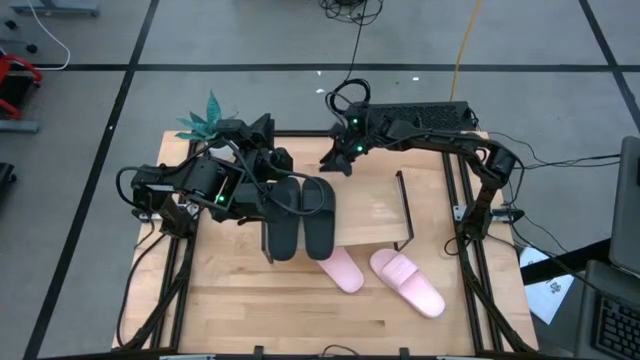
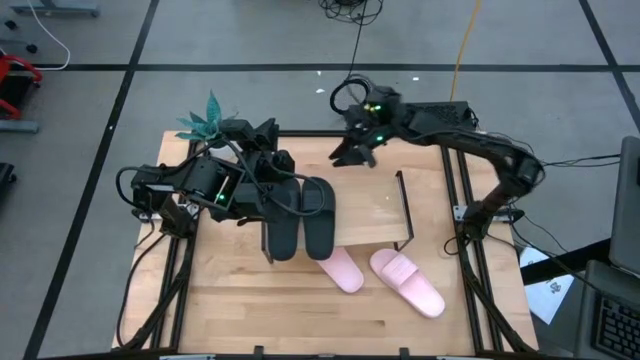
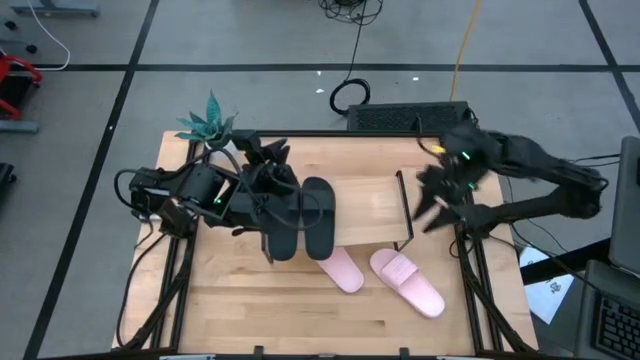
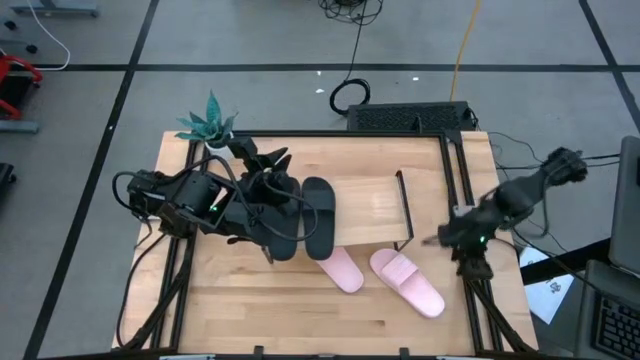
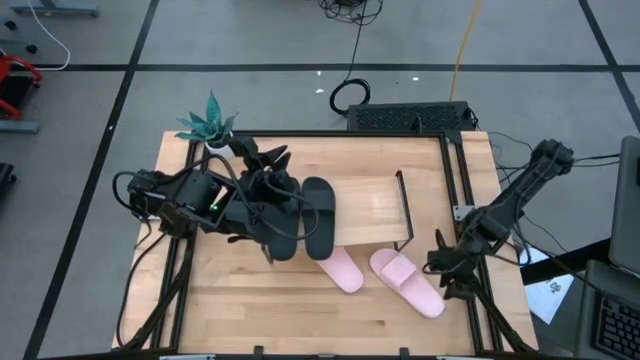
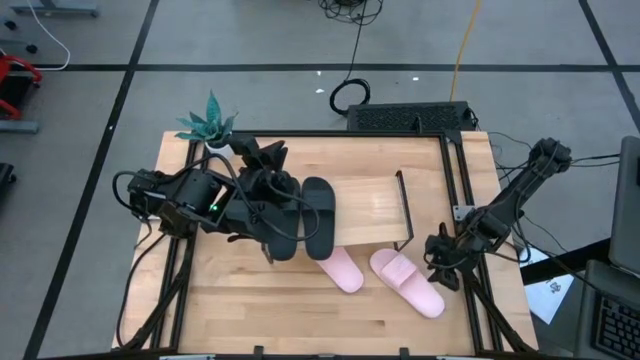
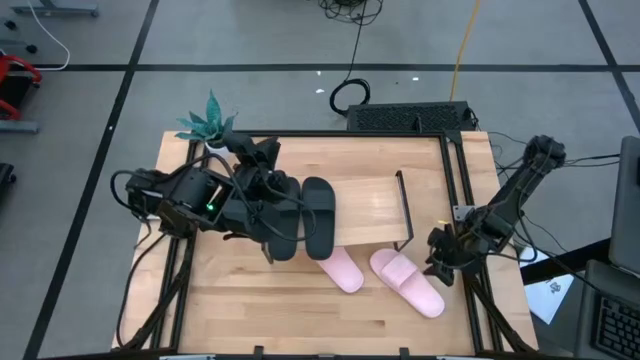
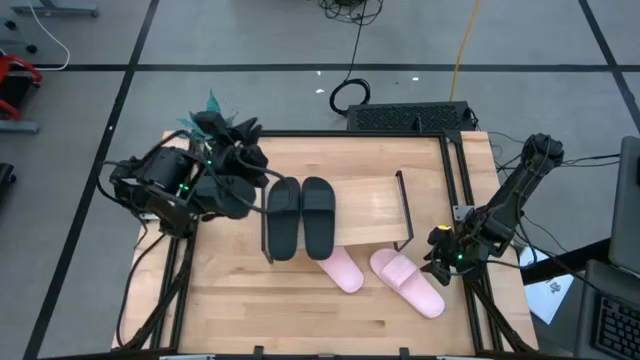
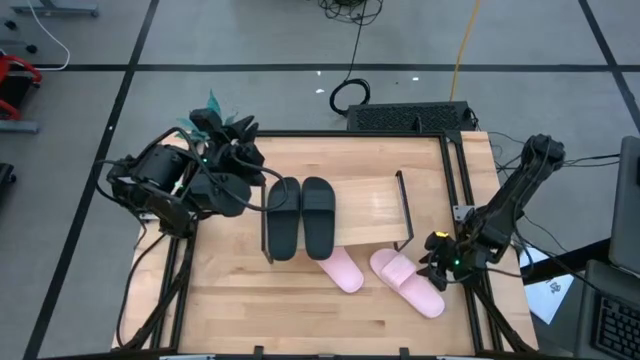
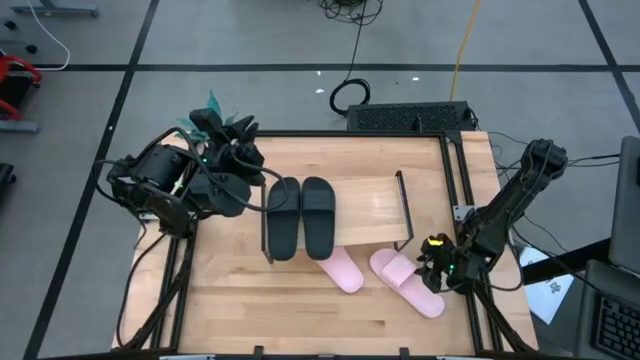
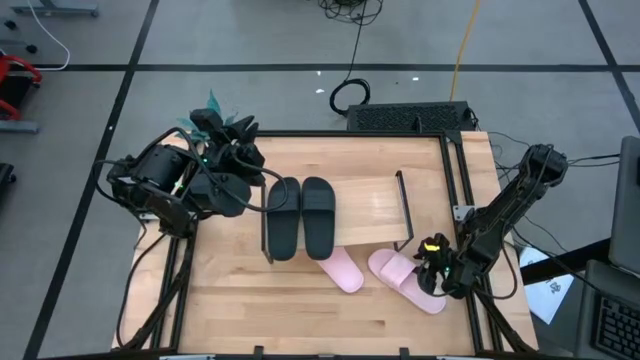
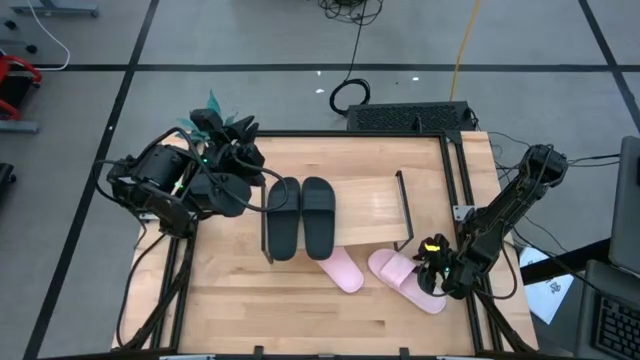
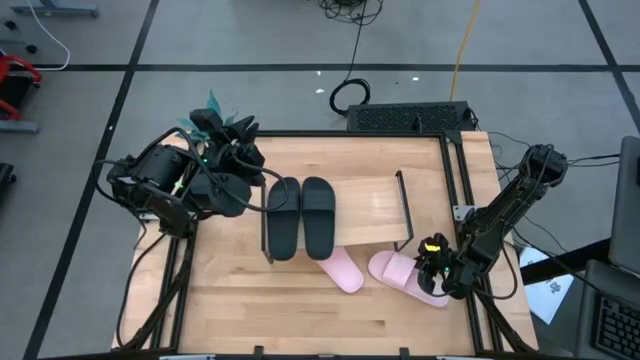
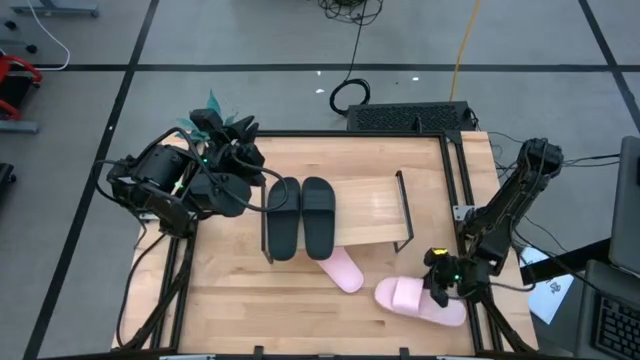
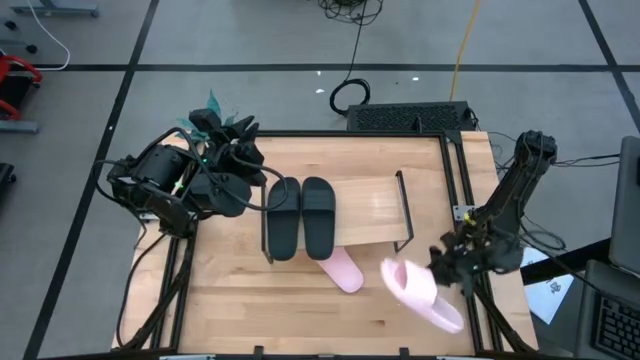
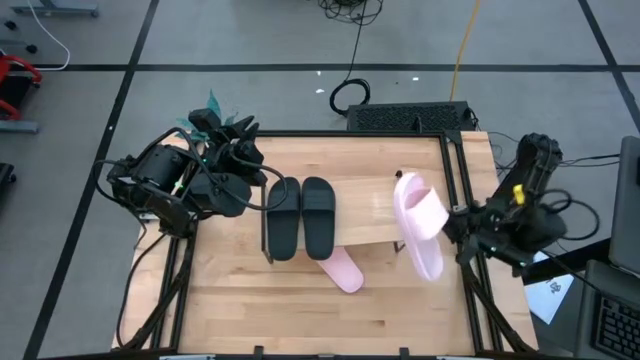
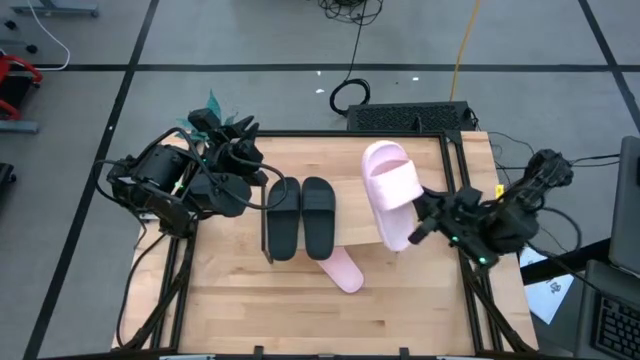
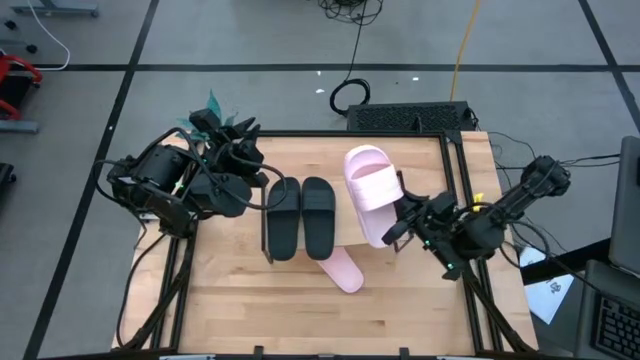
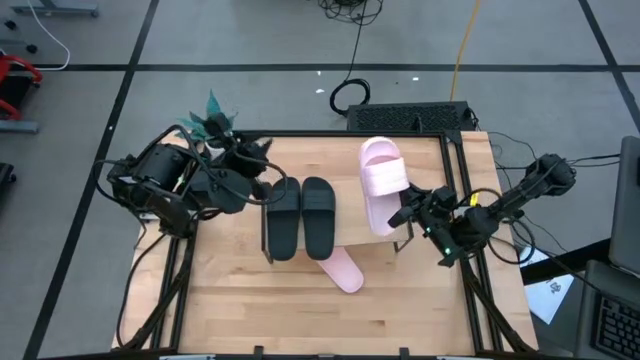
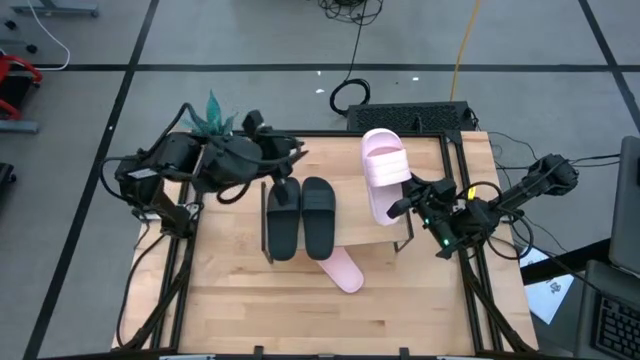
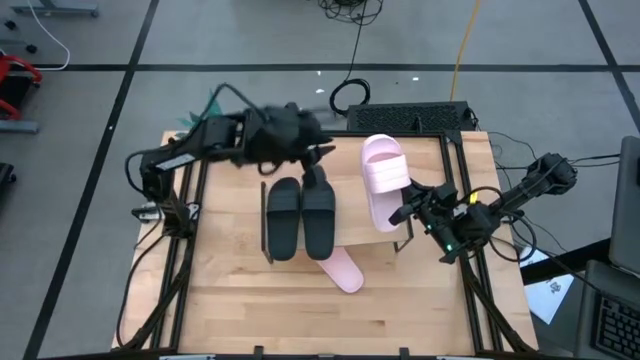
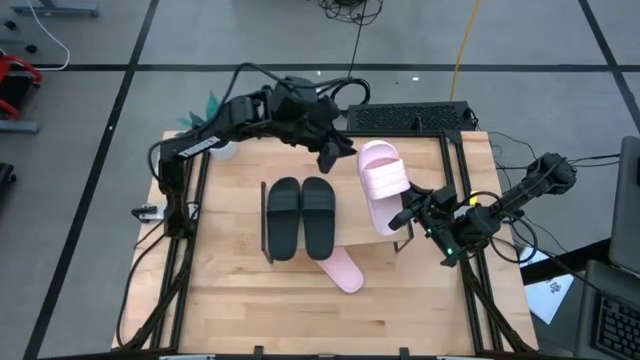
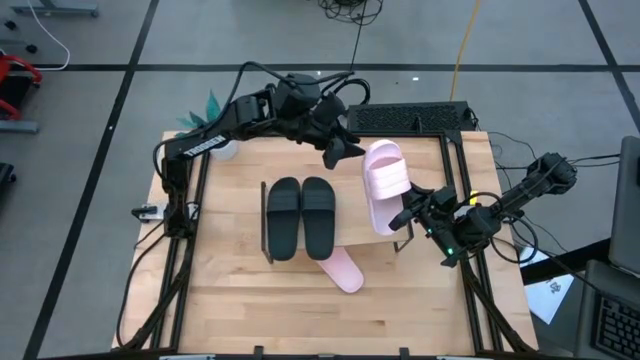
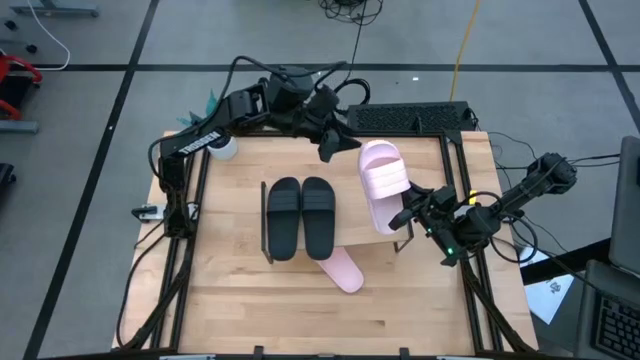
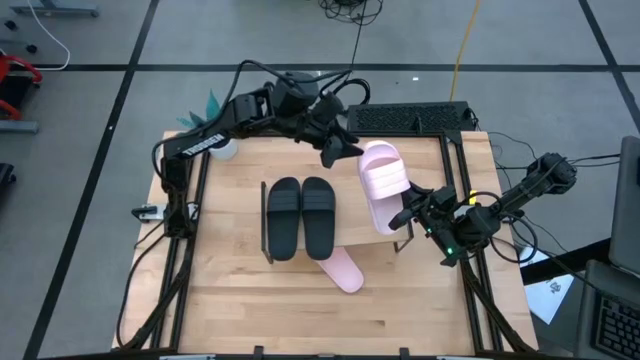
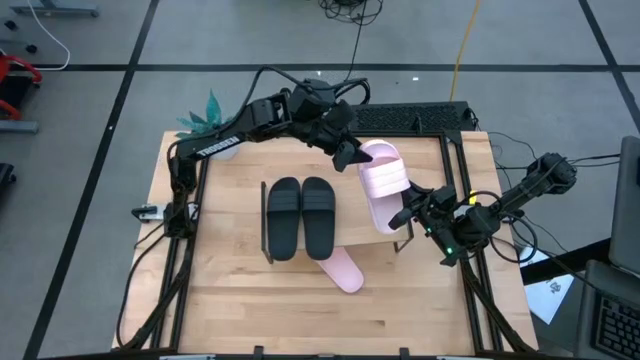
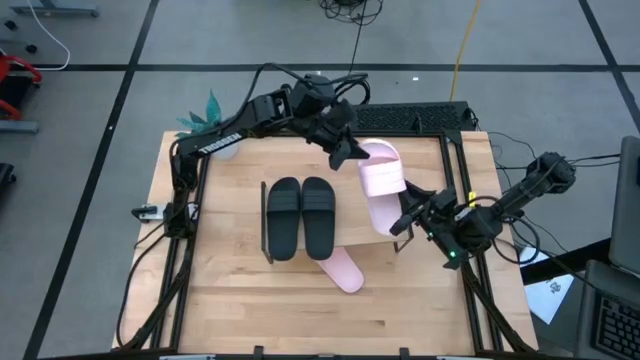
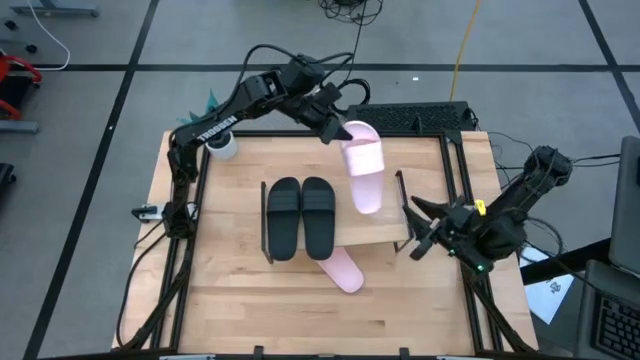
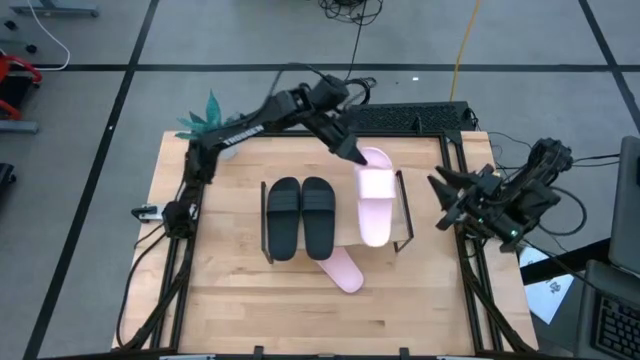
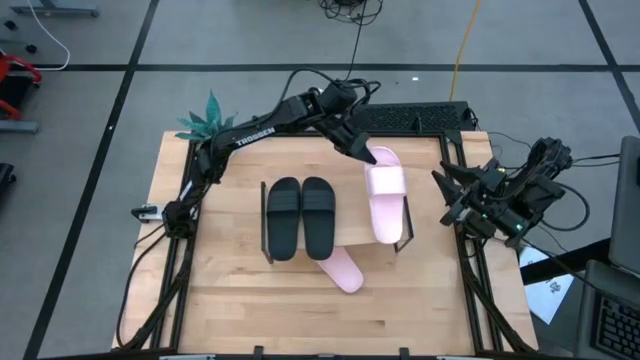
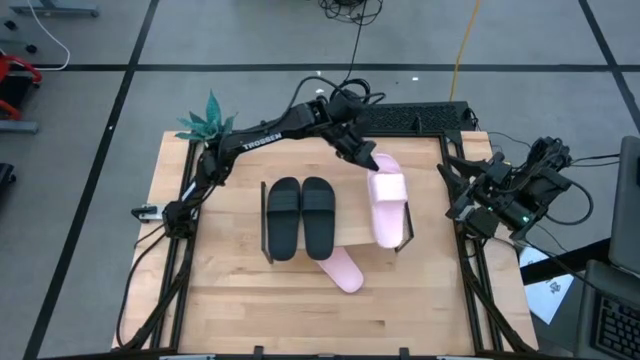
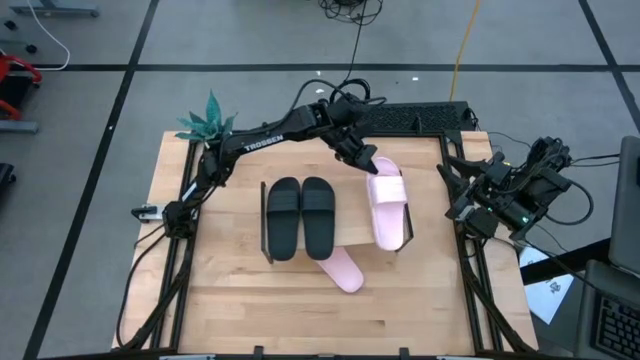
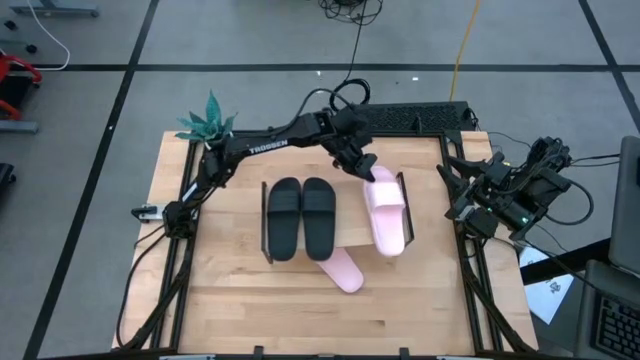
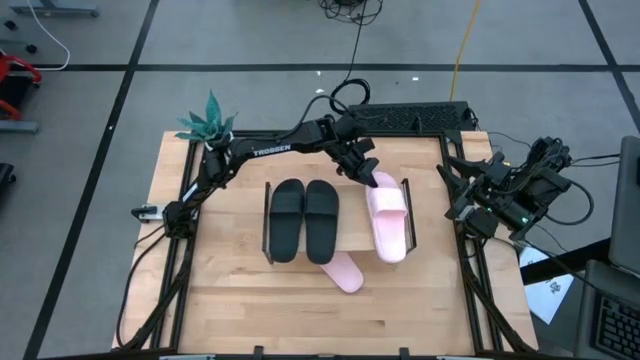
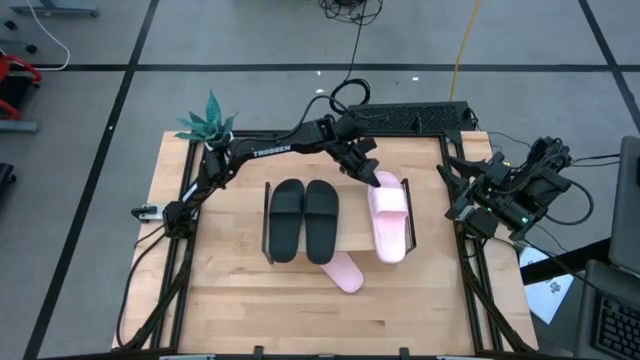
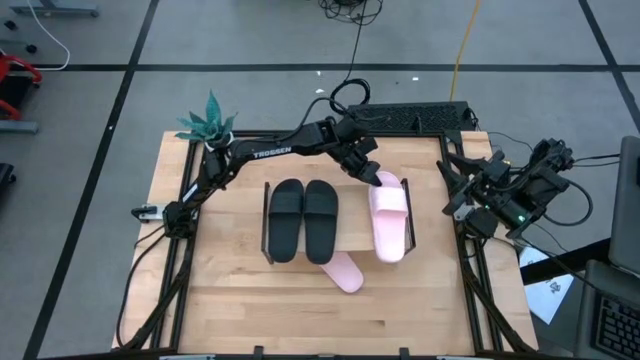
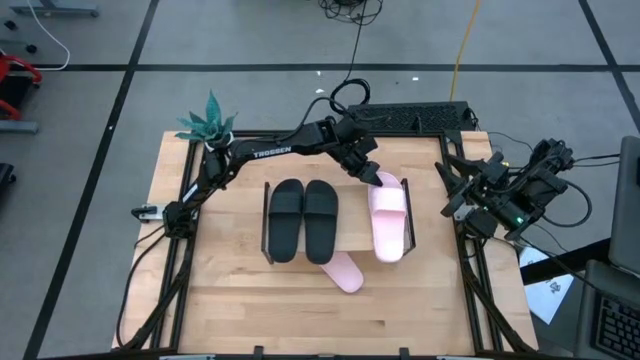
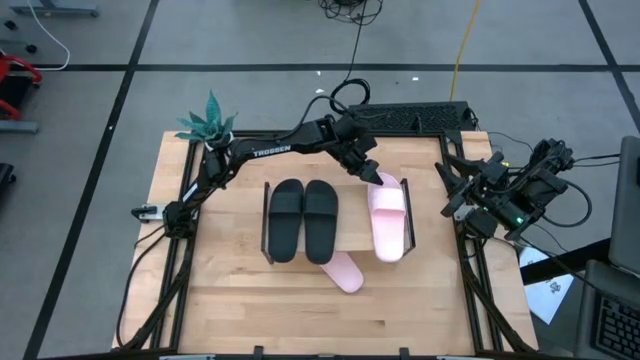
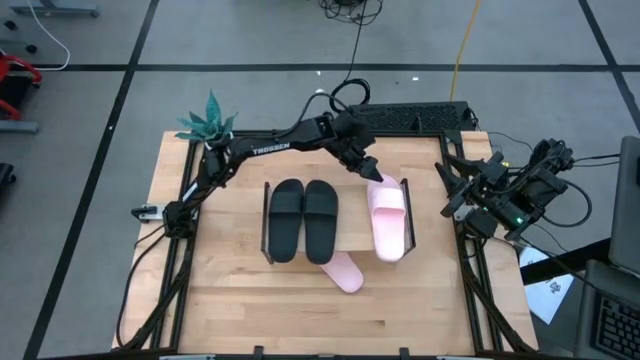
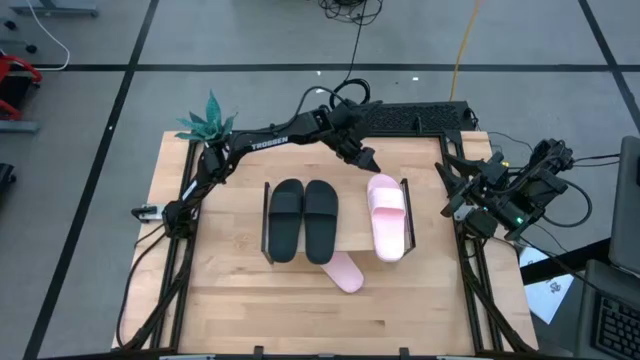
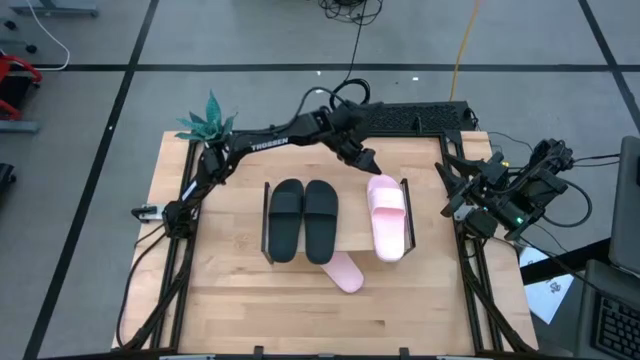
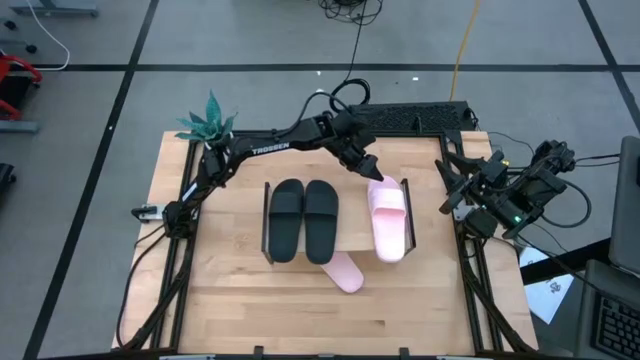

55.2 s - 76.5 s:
Task: Pick and place slides into the shelf
Put the right pink slipper on the shelf
